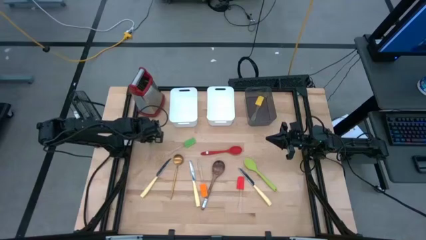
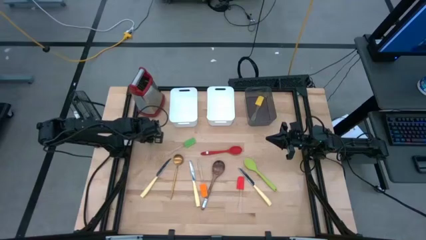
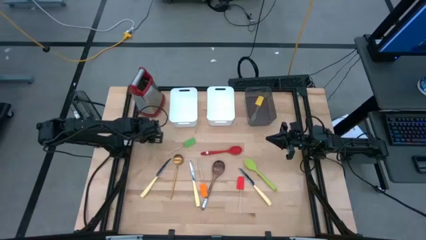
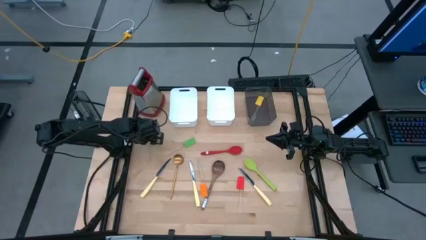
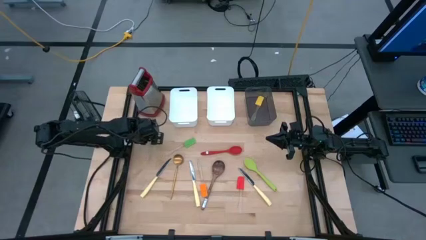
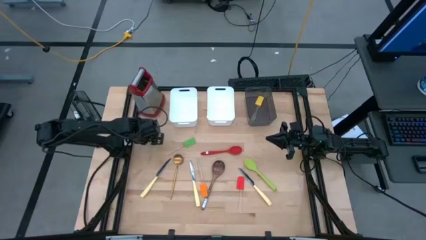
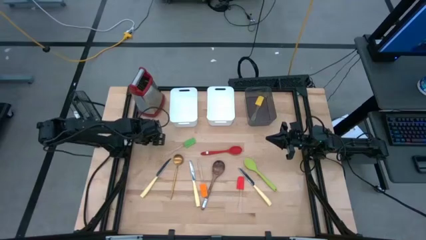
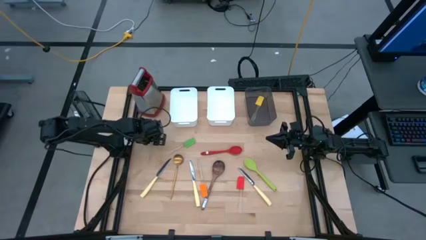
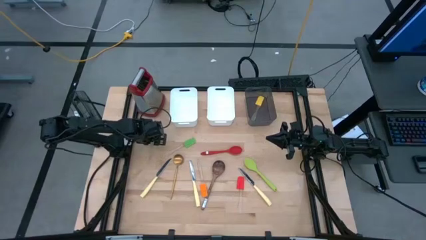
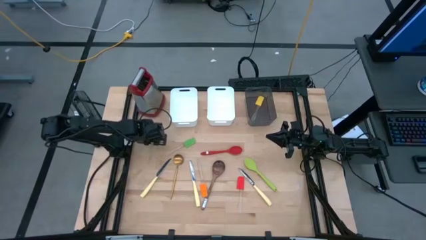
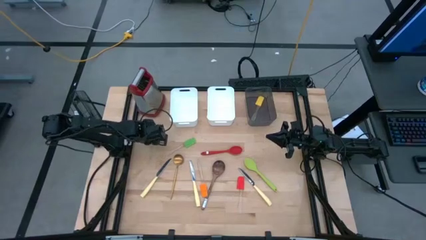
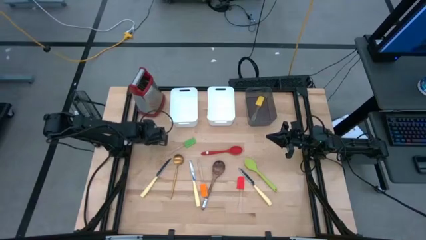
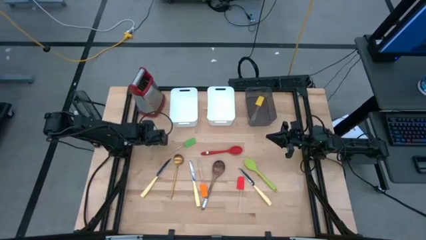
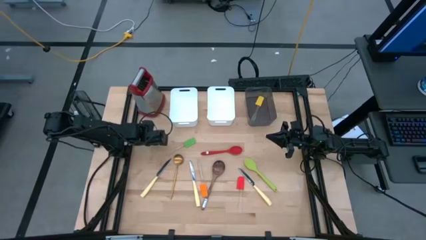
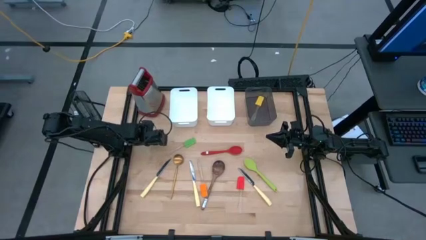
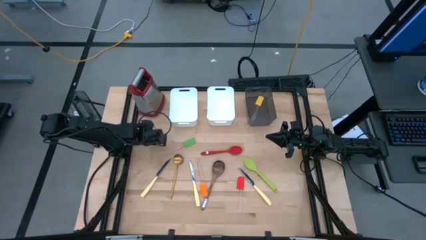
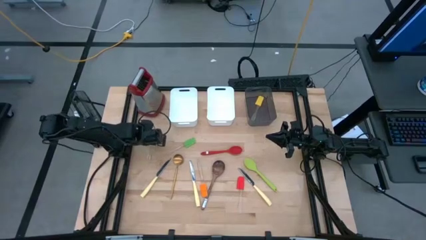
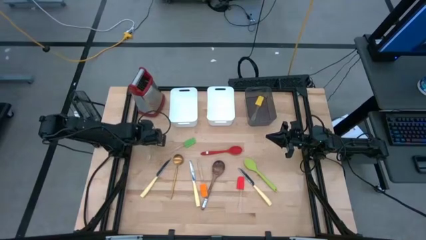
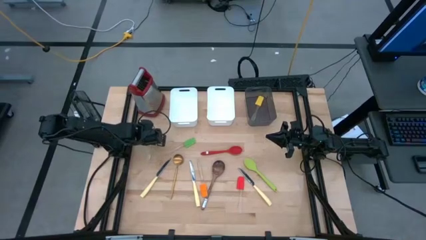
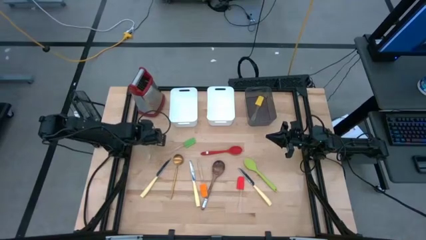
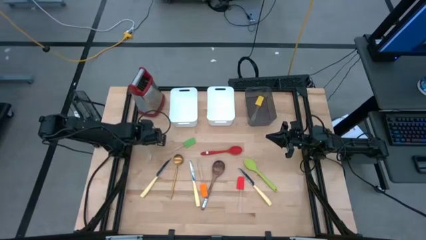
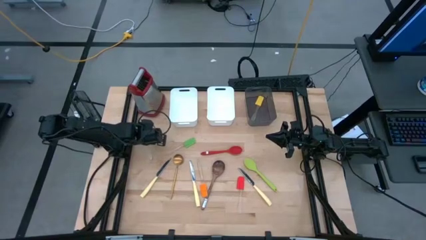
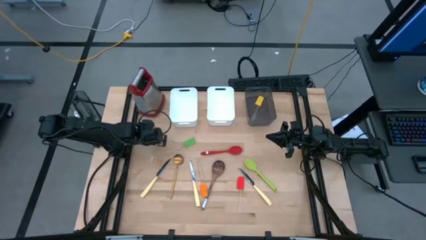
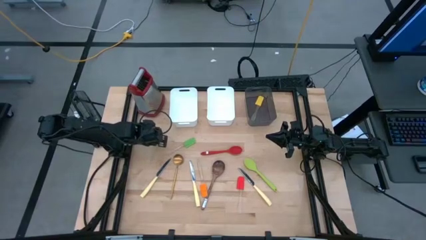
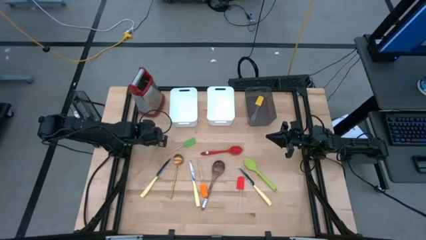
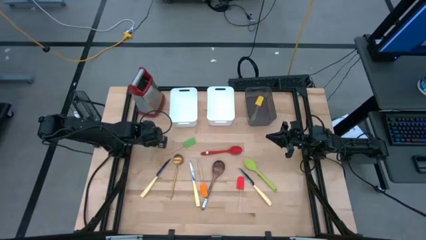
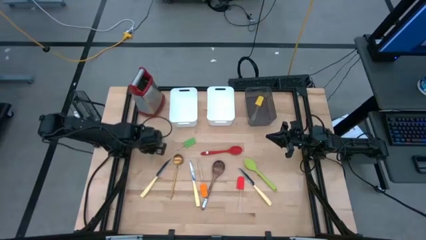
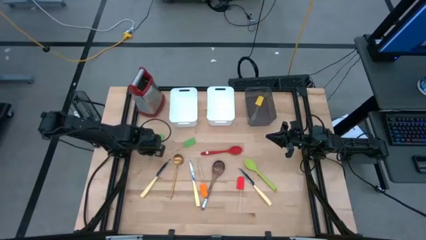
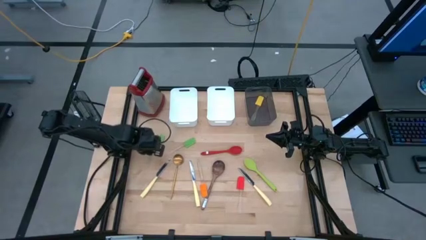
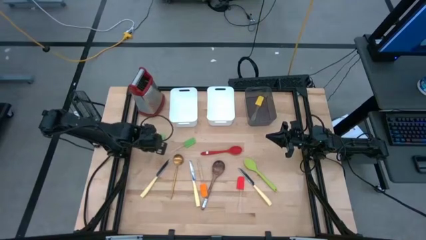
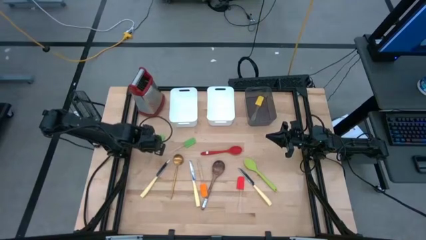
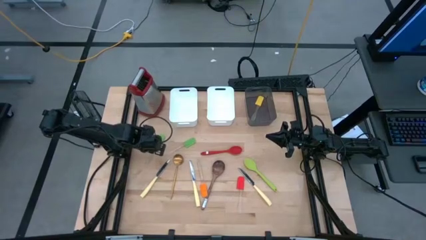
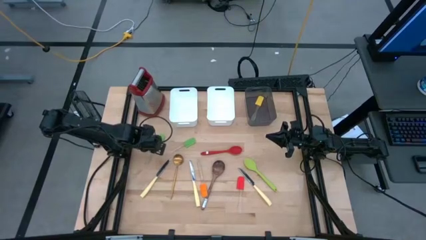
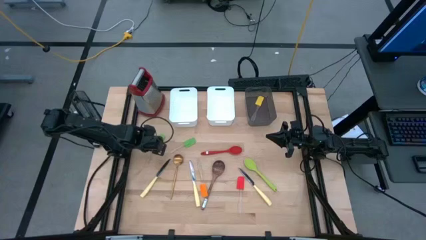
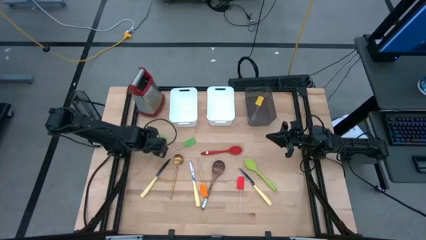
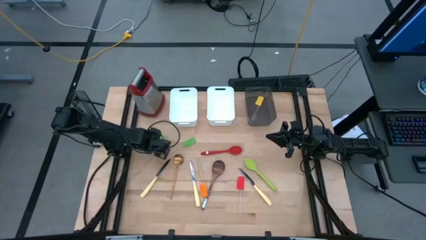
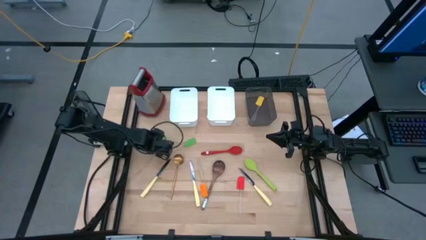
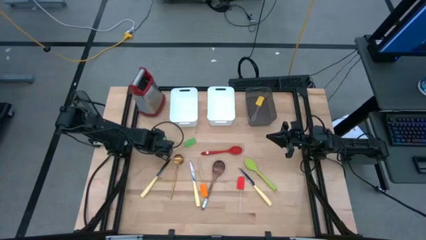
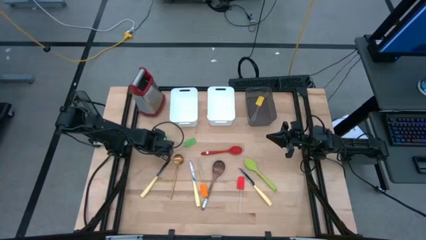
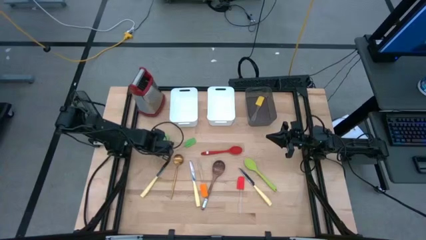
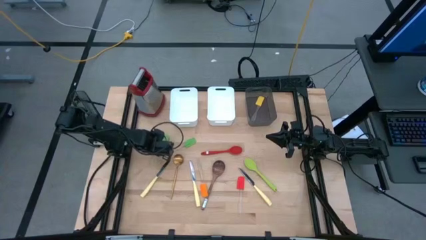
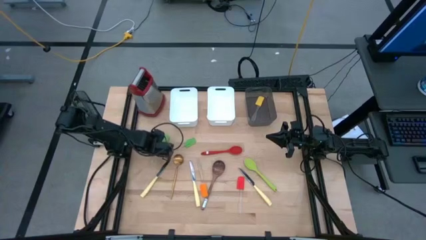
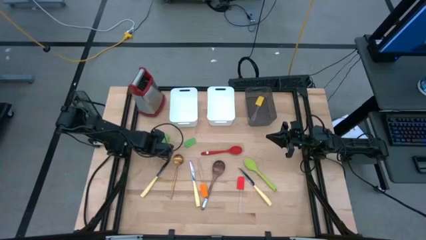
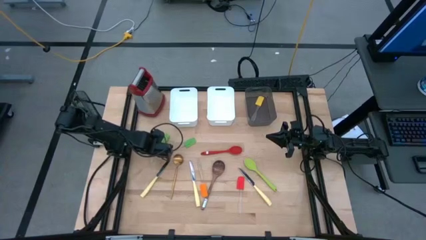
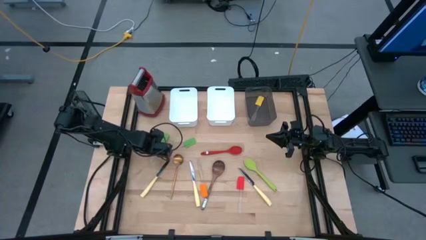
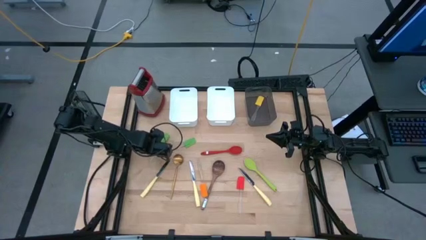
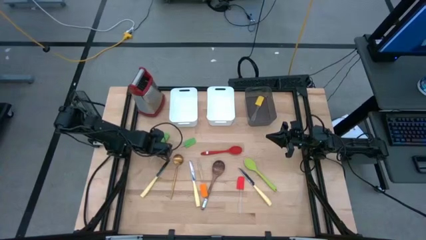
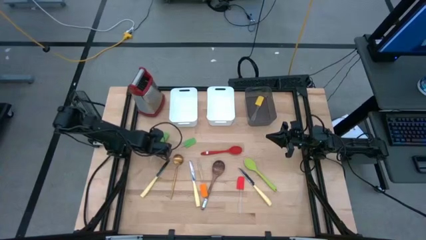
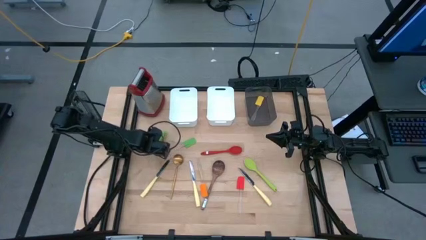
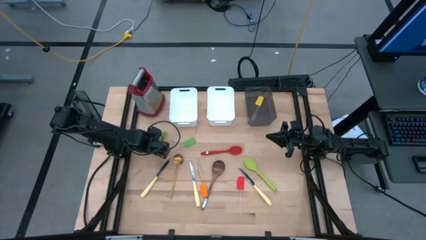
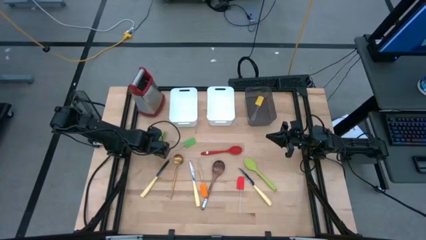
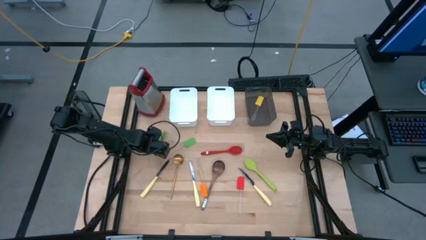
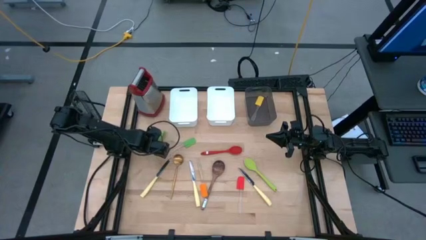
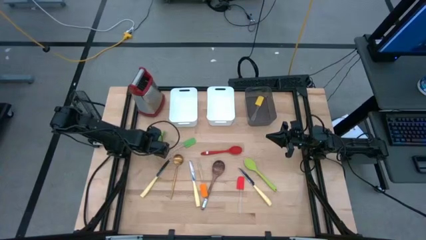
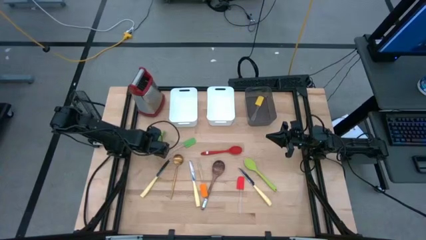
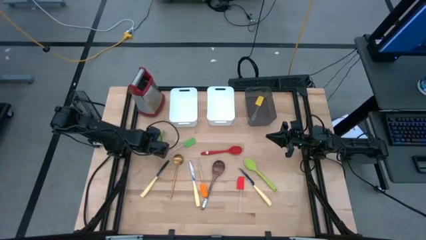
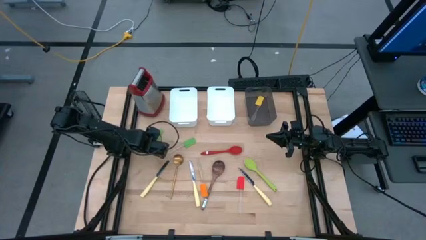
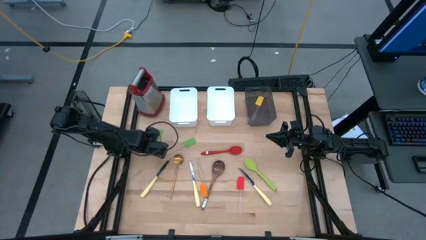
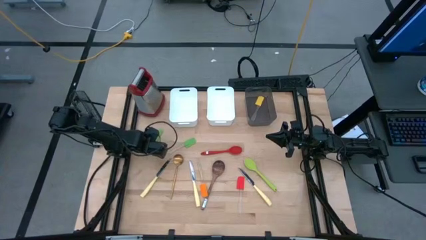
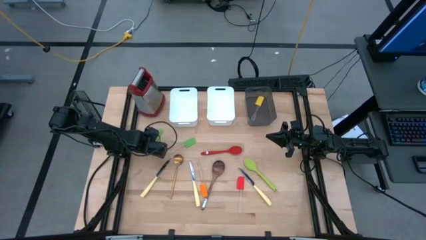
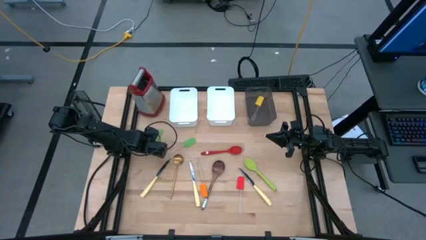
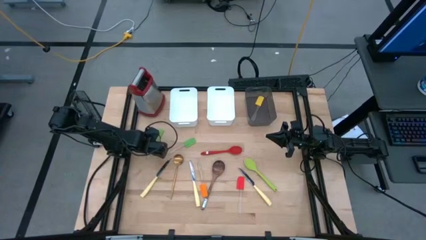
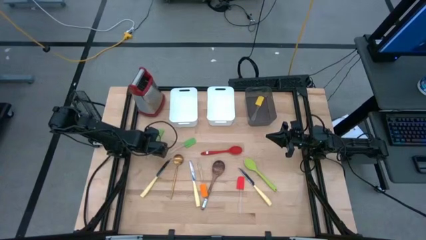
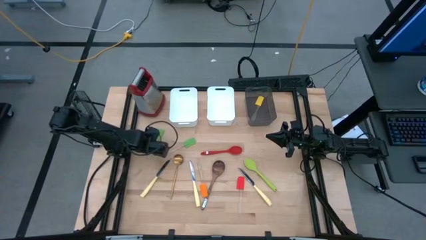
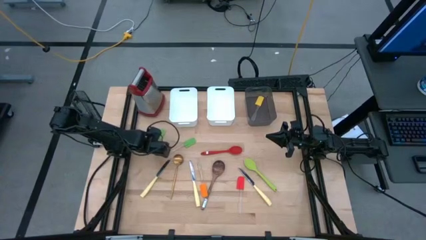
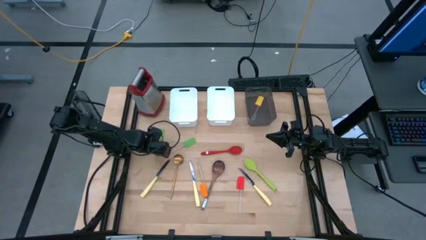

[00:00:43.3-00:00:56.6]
Task: Pick & Place Kitchen Items
Put the green silicone spatula into the black bin
